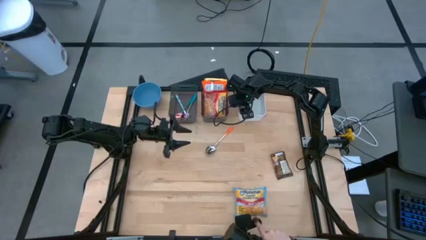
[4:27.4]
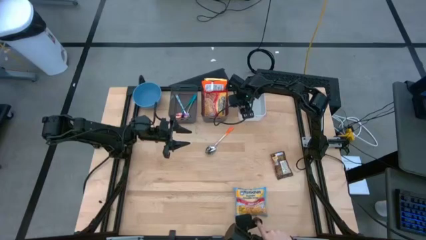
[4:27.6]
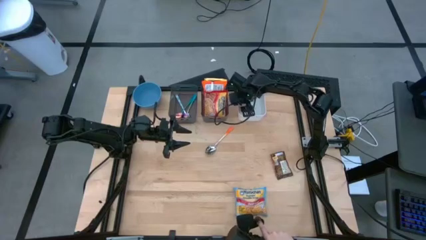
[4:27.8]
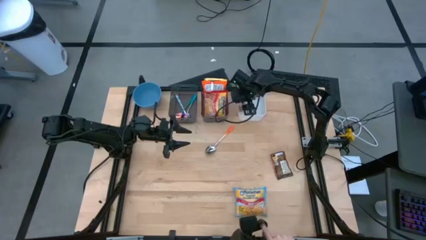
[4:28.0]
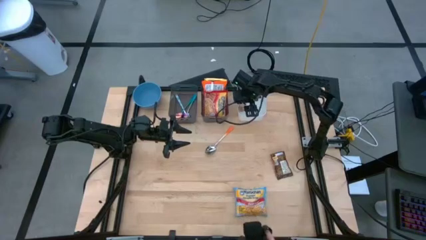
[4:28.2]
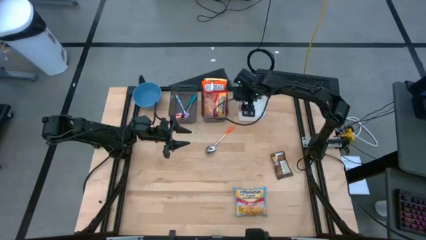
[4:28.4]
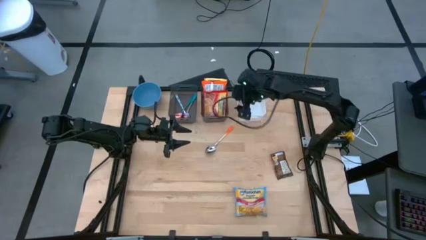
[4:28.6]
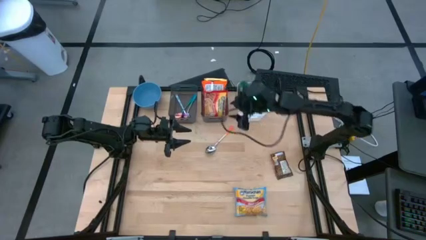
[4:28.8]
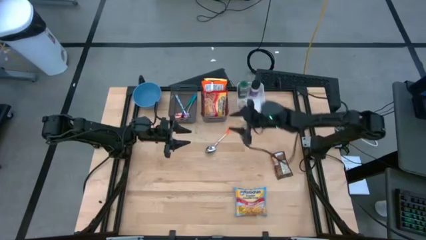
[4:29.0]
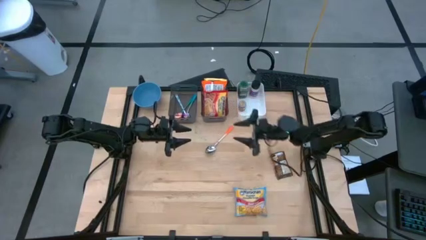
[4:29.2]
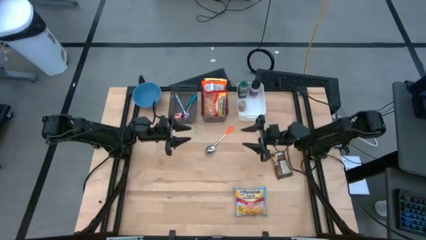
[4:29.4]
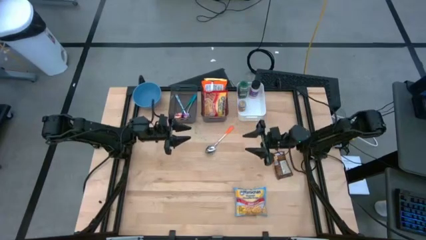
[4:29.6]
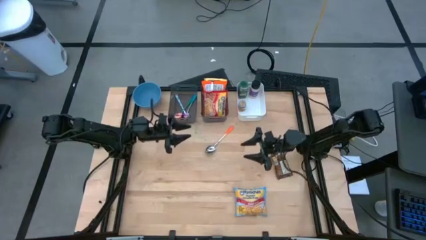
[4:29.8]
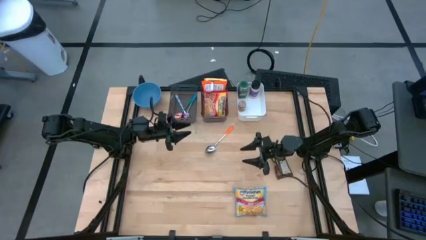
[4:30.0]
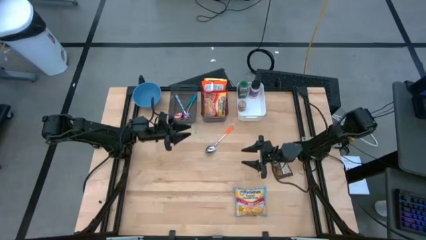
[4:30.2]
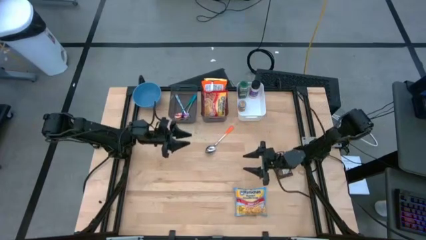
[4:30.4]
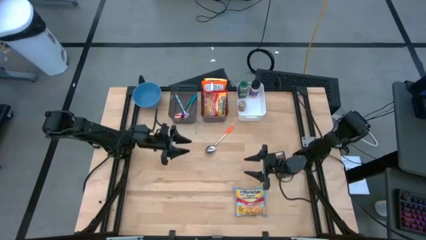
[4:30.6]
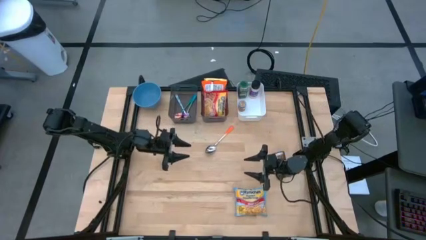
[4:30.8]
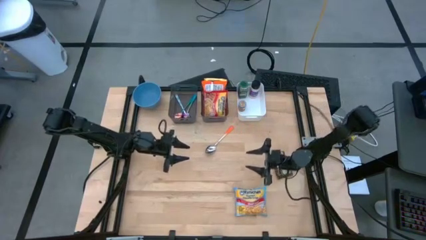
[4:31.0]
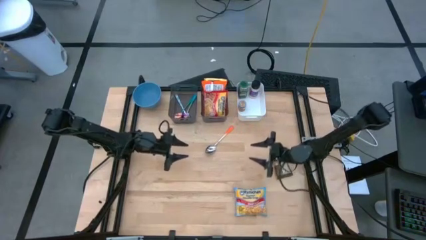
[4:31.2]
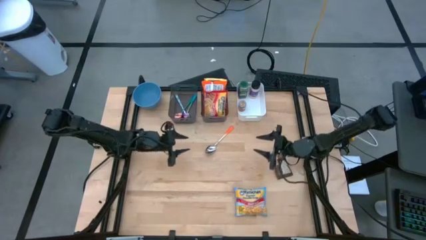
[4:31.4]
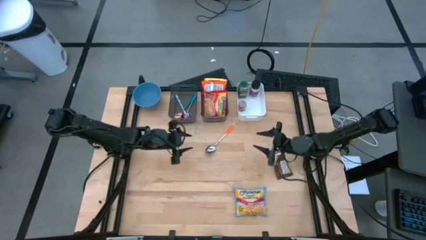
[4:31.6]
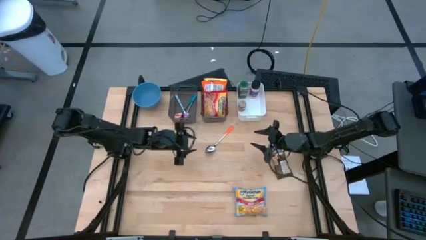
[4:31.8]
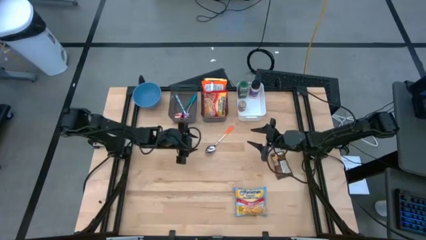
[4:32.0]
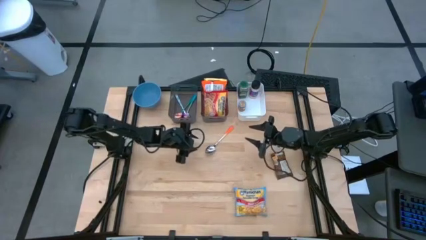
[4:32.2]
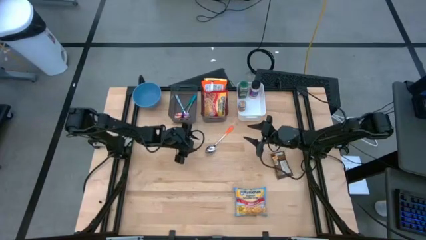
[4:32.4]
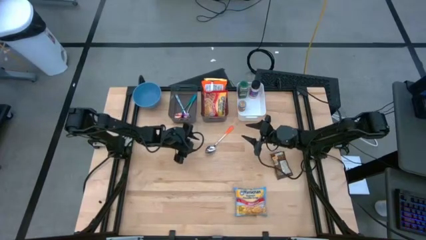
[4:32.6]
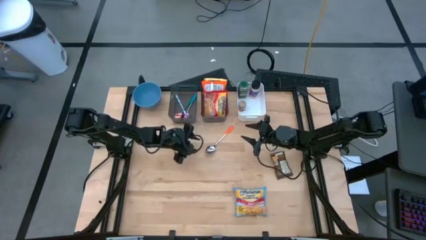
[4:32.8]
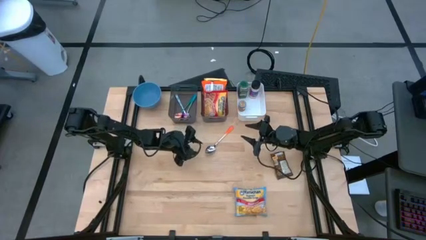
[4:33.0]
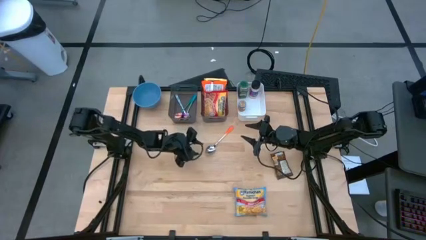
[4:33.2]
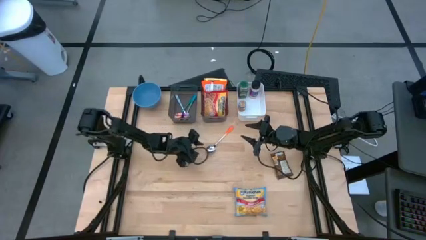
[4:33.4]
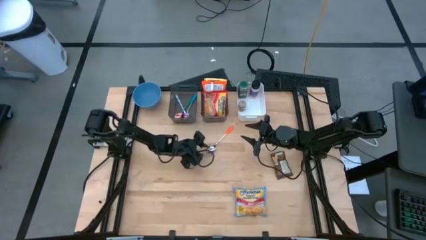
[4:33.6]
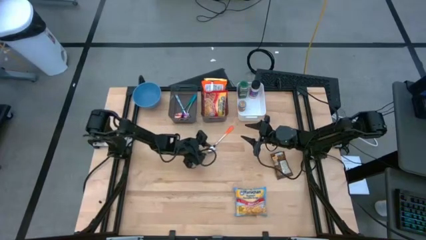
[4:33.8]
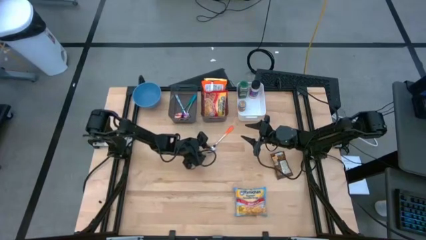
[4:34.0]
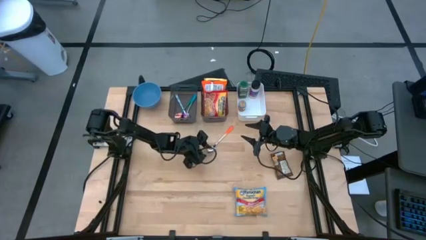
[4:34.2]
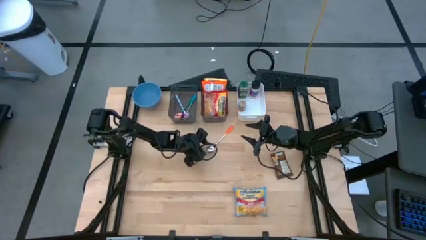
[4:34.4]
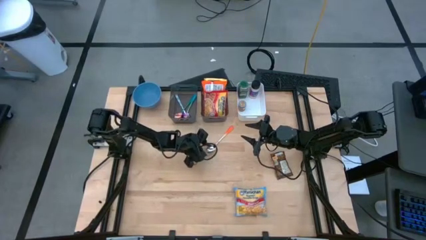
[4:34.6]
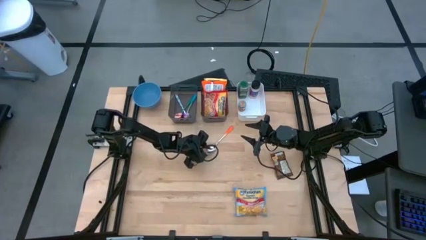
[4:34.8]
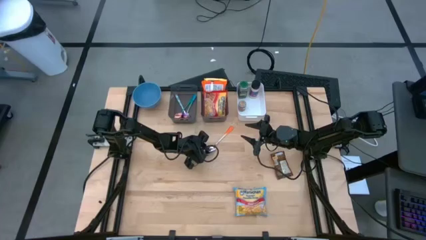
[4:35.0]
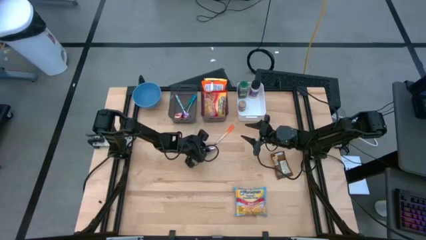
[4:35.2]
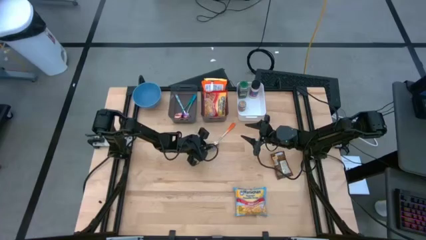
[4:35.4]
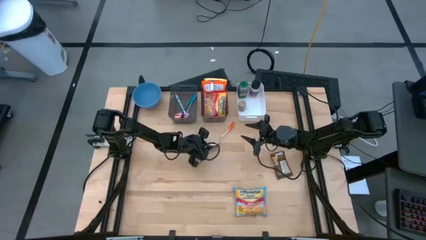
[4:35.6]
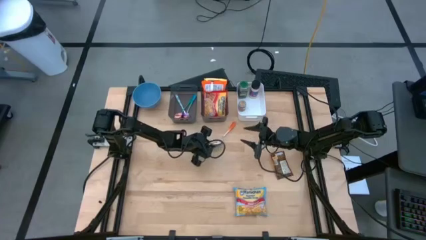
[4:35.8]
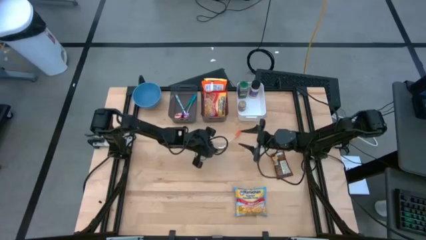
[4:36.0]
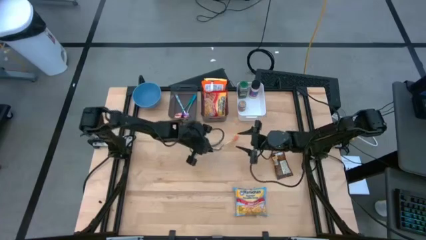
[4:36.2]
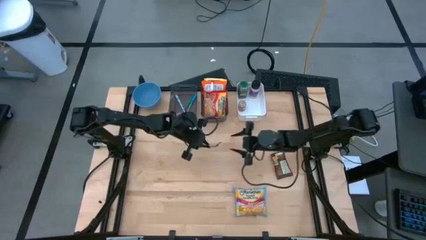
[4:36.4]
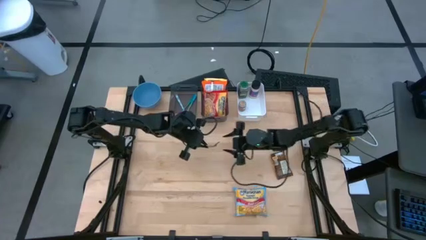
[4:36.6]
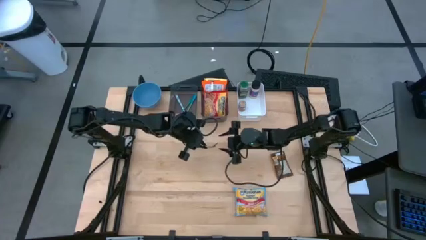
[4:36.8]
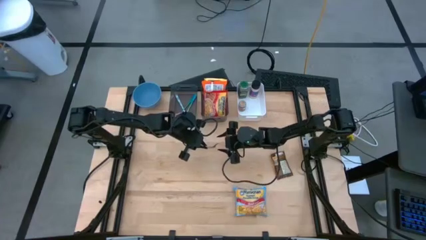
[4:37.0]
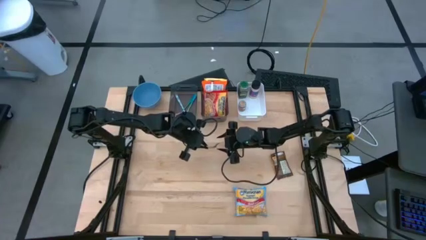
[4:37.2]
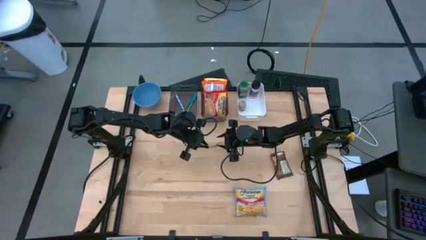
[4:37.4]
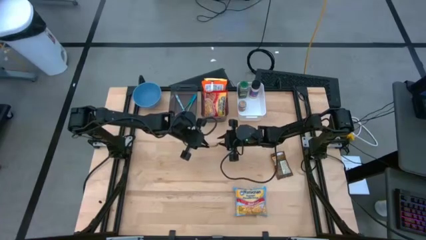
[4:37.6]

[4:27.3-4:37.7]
Task: Pick & Place Food Item
Put the orange spoon into the left black bin

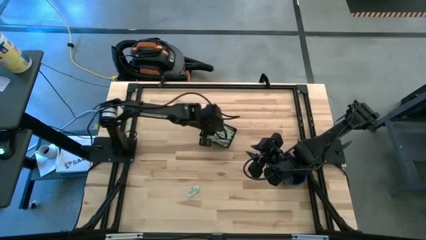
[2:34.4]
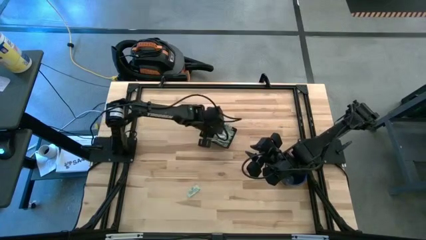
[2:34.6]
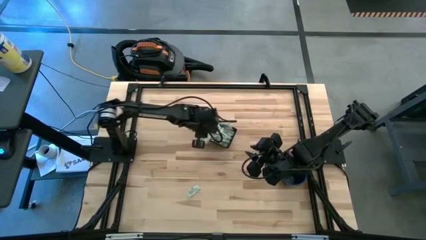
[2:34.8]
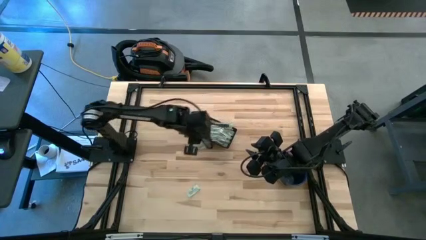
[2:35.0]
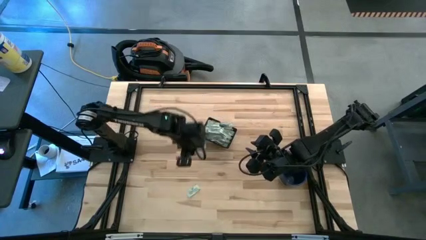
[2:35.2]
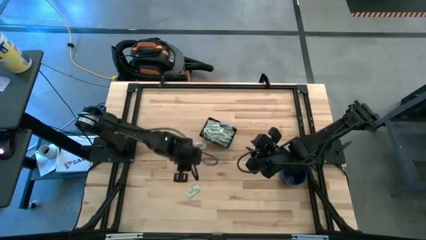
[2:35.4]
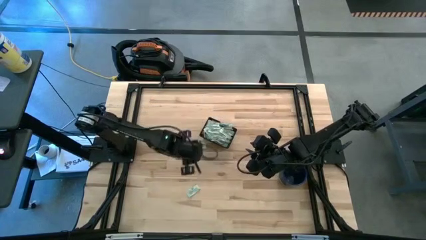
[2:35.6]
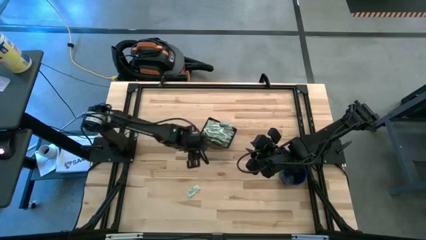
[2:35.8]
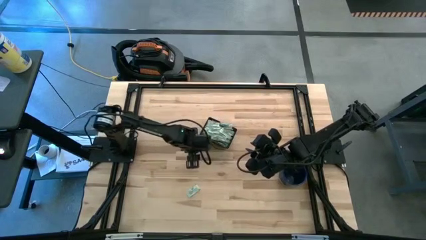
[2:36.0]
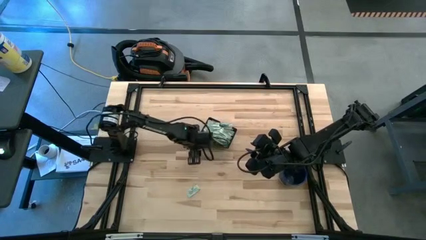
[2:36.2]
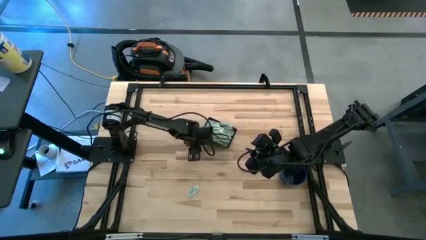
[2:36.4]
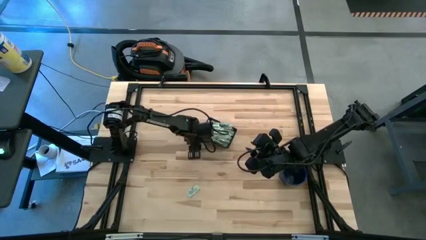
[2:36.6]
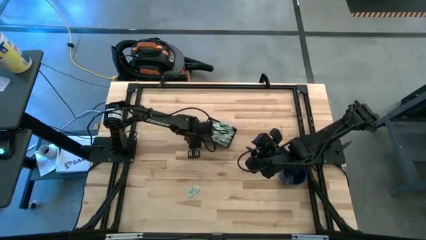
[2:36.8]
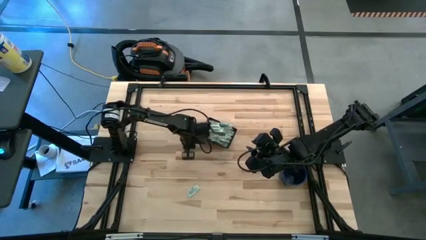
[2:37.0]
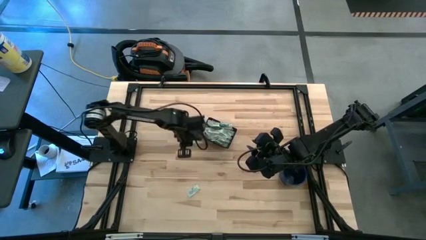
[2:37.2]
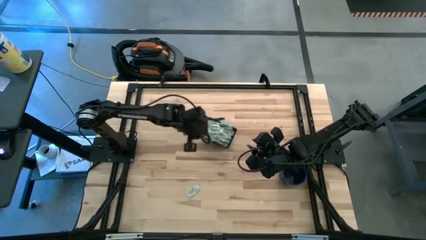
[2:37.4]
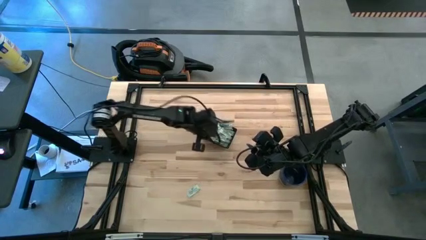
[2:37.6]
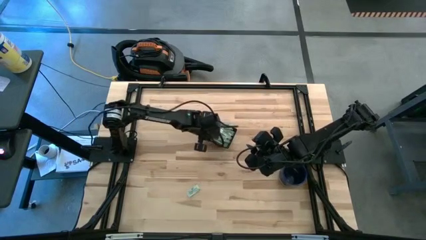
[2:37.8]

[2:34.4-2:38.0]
Task: Pick and place Stevia / Truvia into bins
Put the stevia packet into the black bin

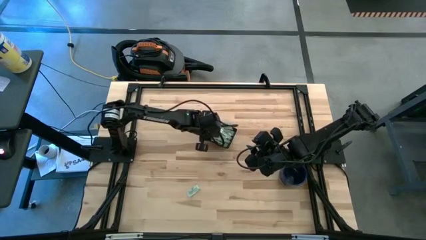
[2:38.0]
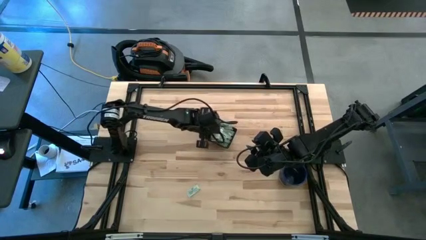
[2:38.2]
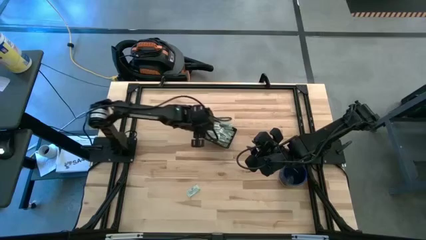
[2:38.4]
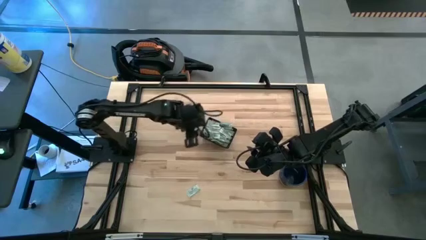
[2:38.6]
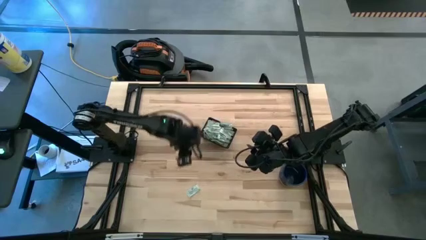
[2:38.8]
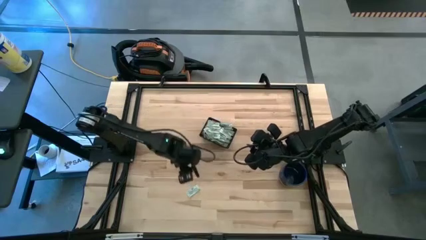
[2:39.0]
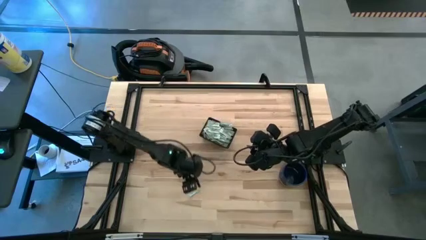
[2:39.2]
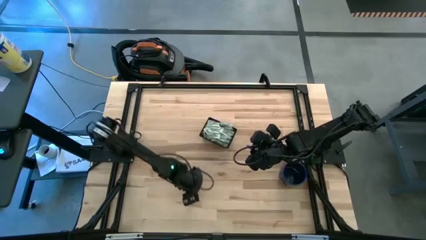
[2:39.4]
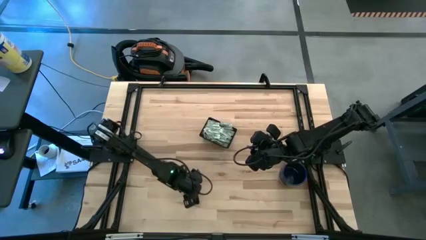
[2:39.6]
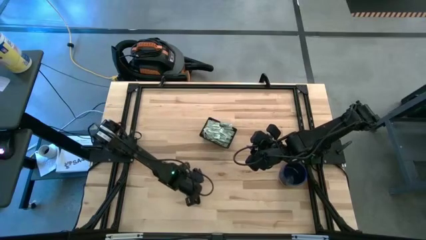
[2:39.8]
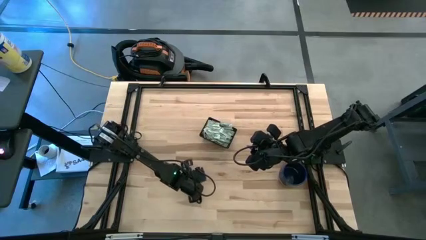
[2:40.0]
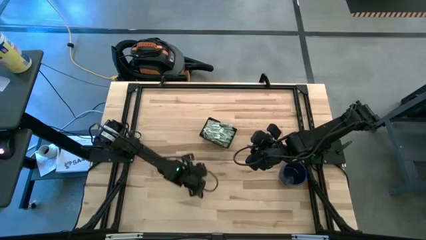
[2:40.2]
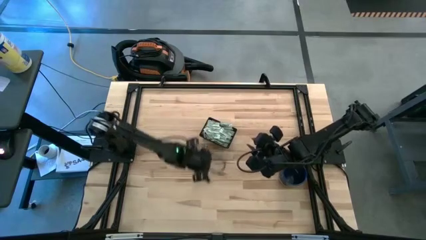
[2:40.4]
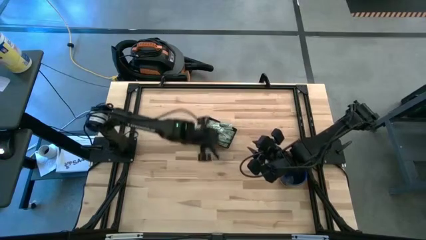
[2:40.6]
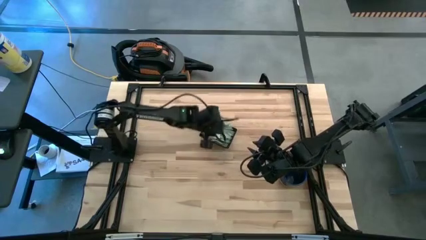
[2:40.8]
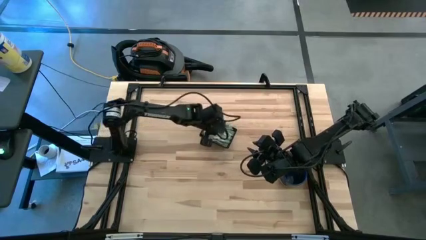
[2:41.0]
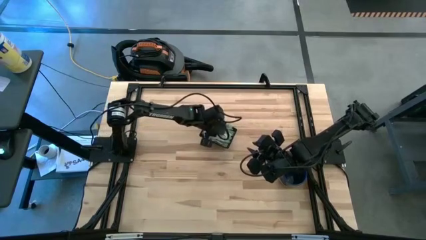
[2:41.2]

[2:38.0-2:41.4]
Put the stevia packet into the black bin
